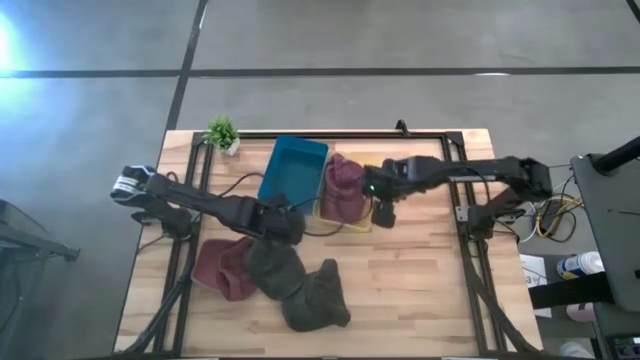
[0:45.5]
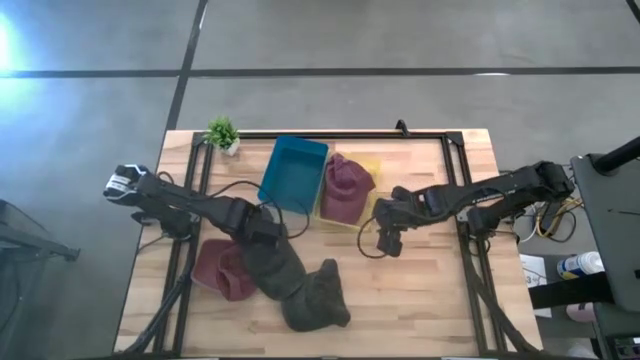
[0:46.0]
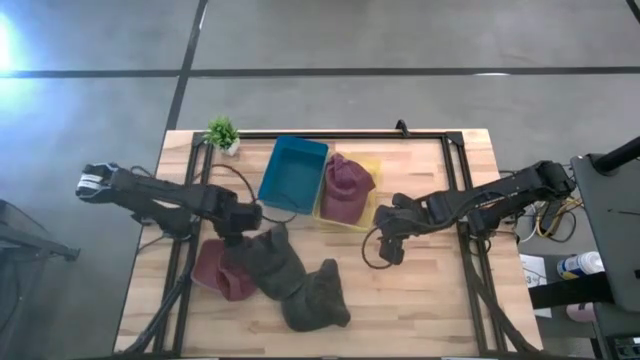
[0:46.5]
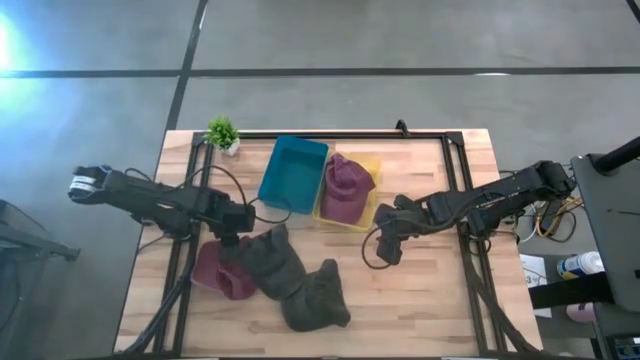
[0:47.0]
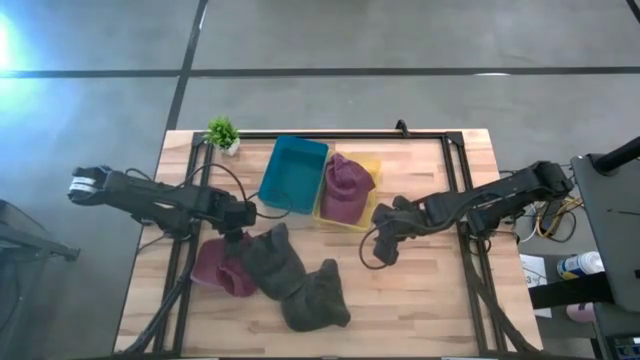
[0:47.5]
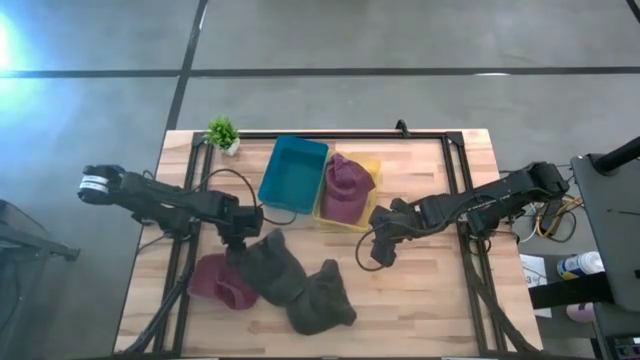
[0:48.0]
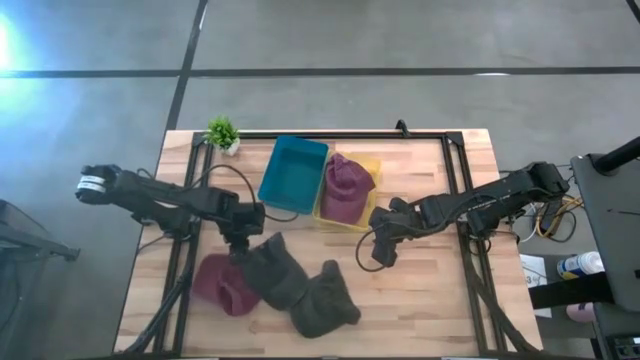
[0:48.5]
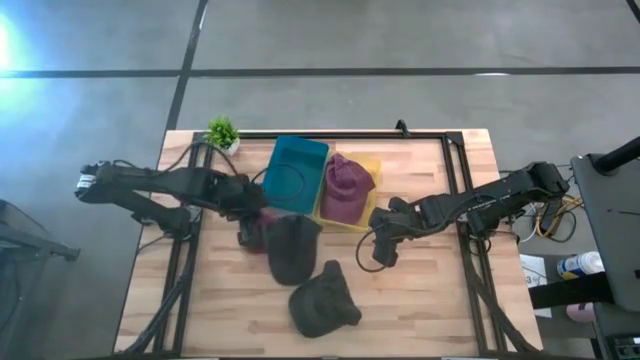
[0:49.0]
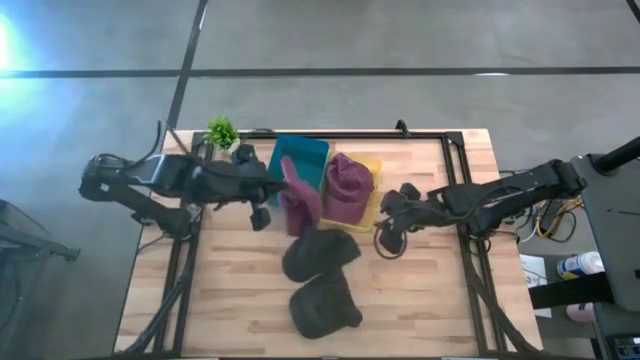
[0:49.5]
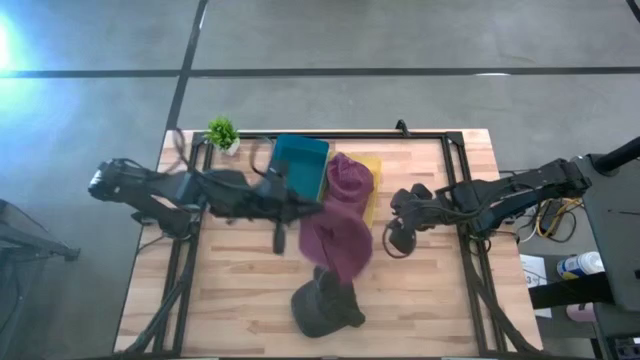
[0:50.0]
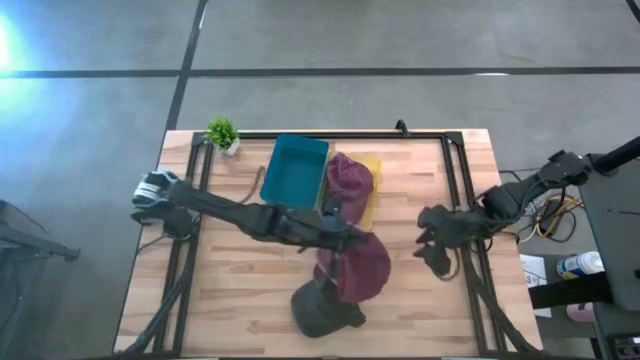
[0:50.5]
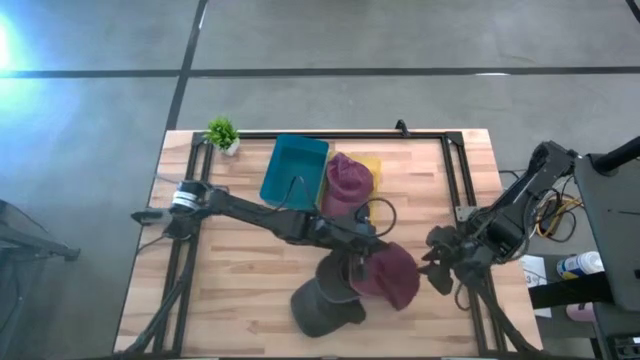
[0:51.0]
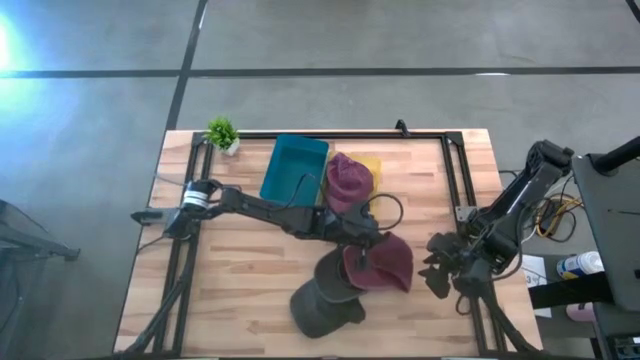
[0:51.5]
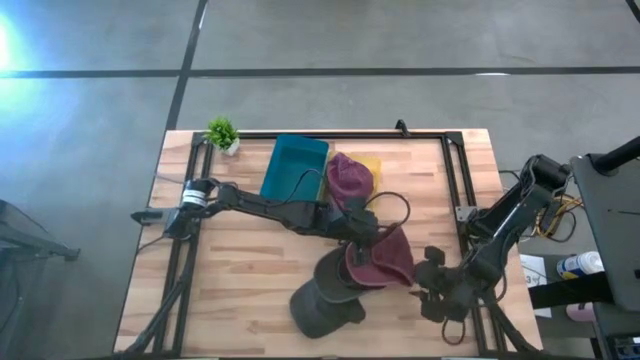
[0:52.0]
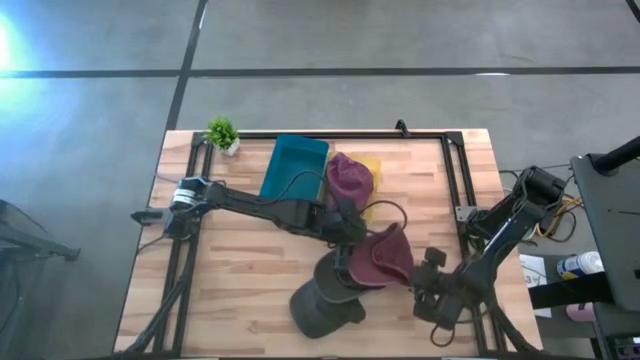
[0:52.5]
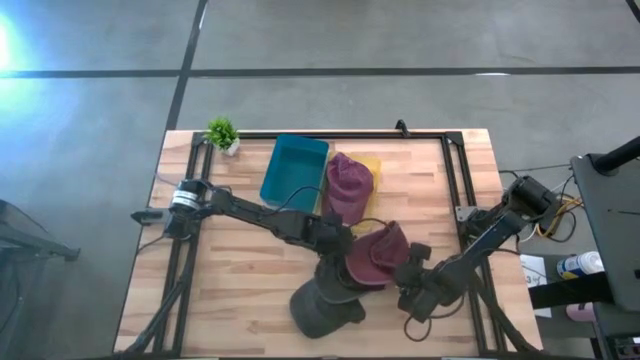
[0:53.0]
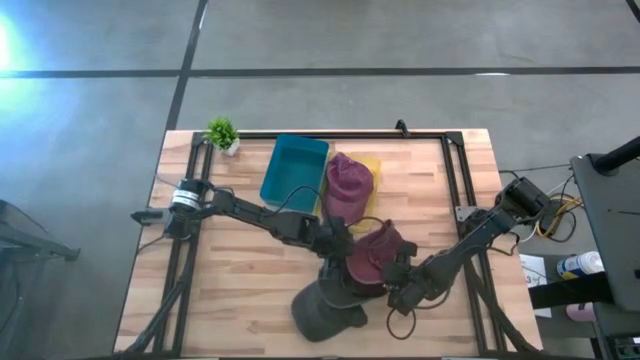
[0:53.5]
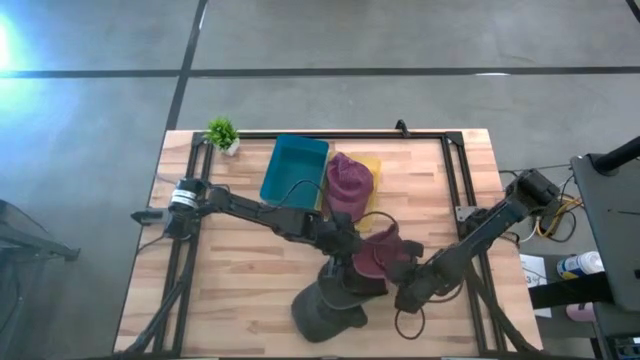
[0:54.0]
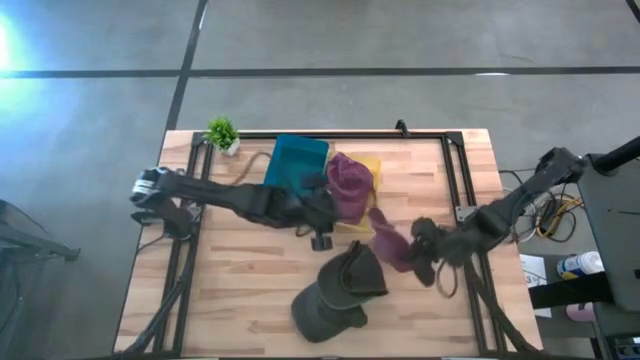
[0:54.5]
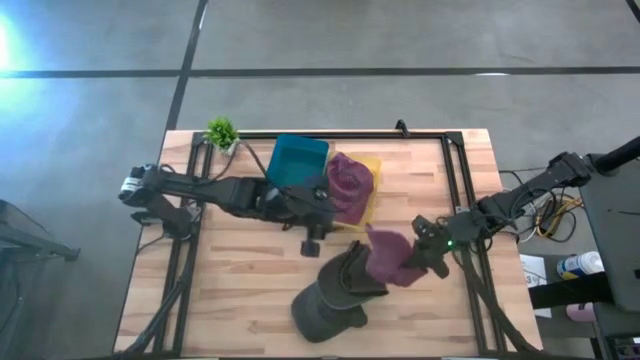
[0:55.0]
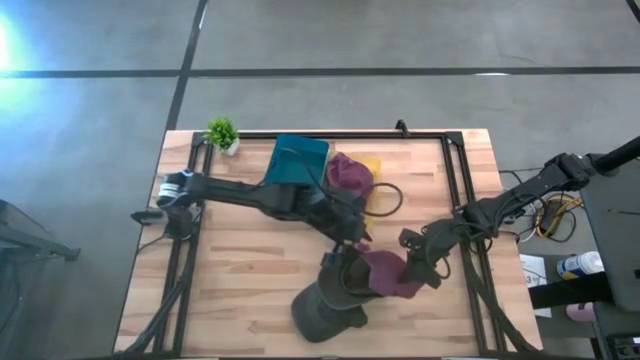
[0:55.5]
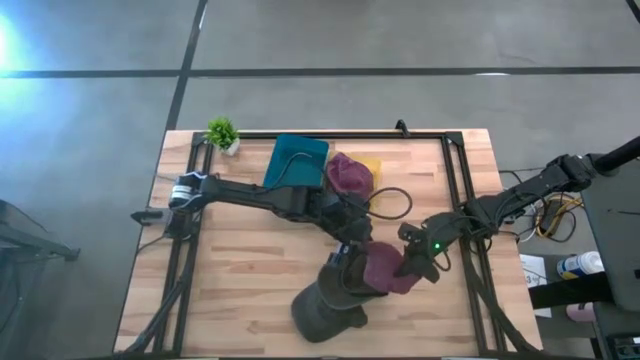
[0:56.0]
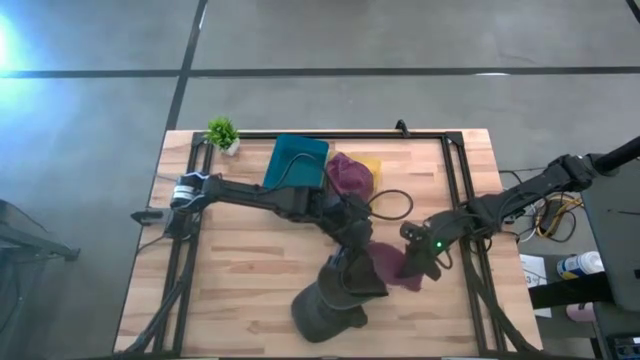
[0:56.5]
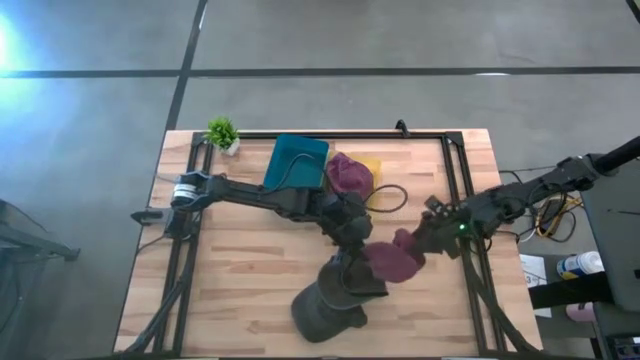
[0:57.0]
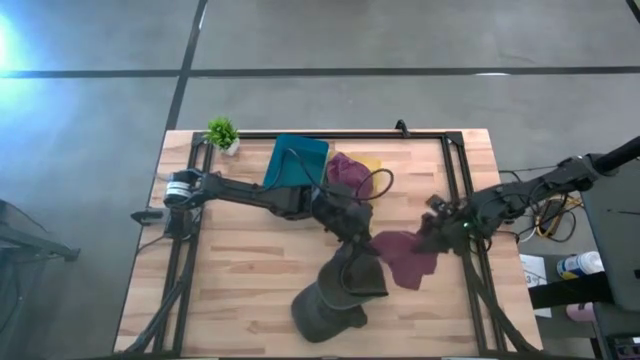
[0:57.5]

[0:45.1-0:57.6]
Task: Pick & Place hat
Put the red cap into the yellow bin

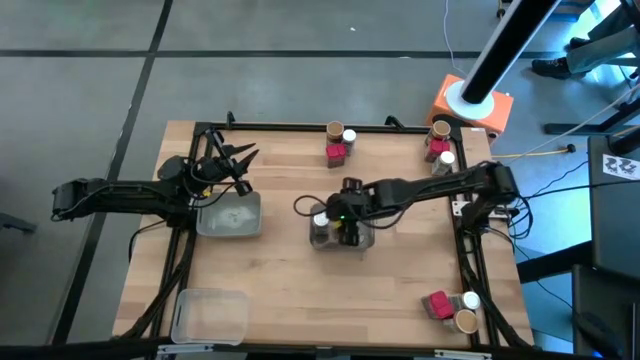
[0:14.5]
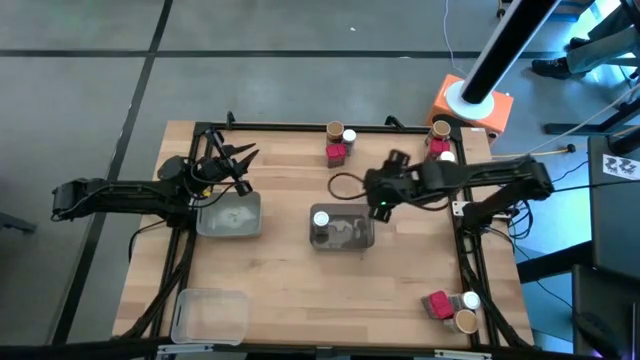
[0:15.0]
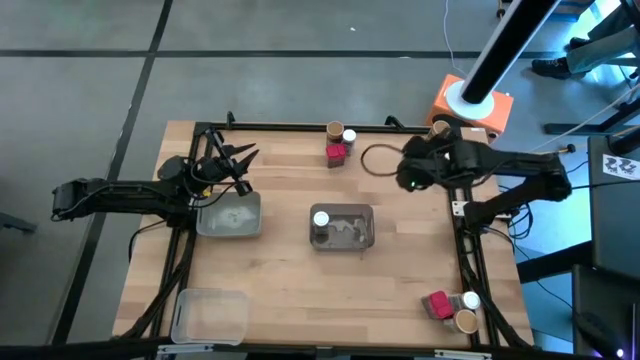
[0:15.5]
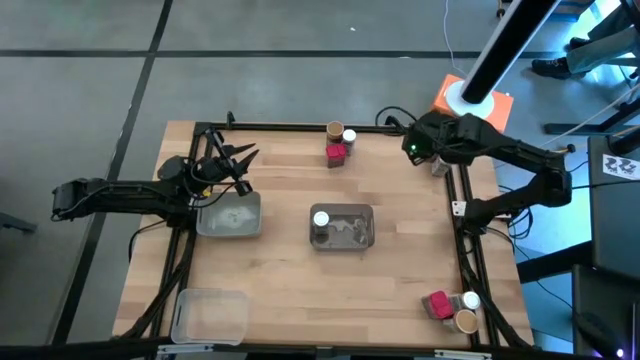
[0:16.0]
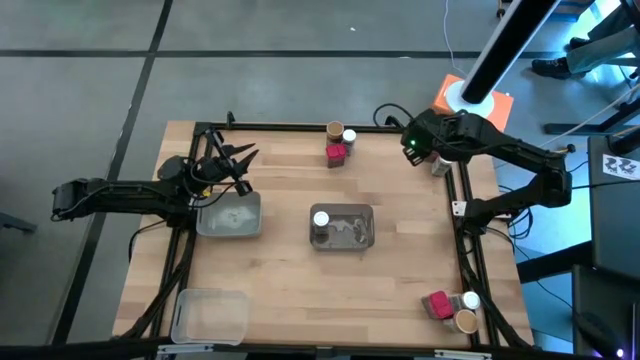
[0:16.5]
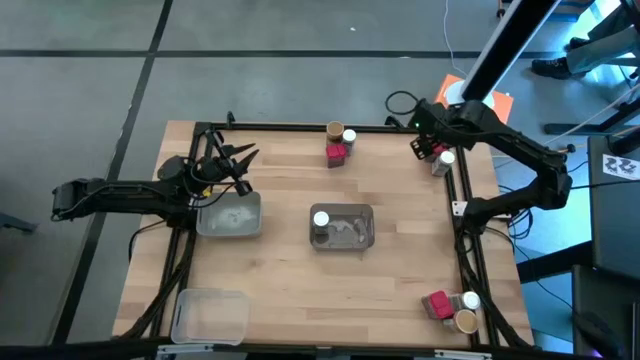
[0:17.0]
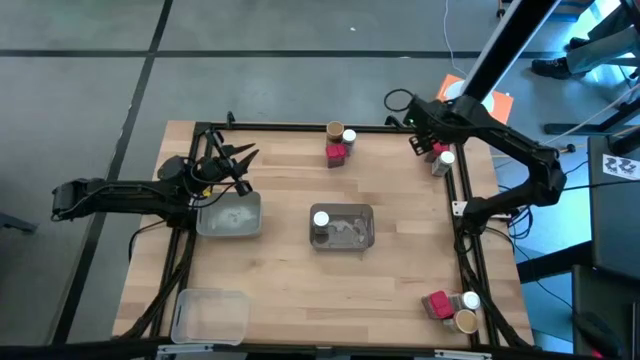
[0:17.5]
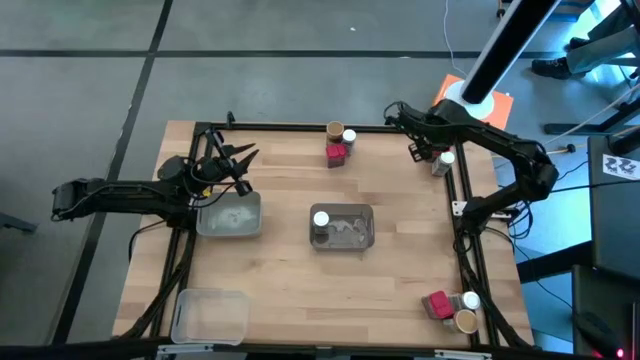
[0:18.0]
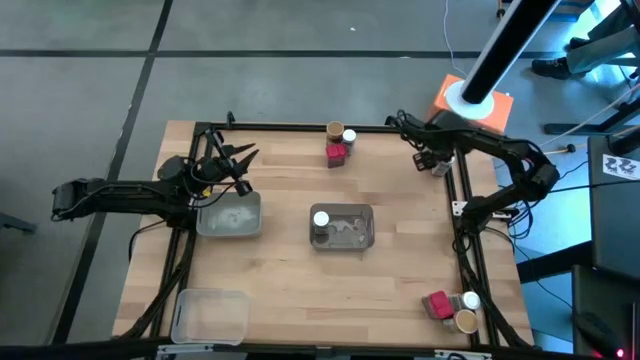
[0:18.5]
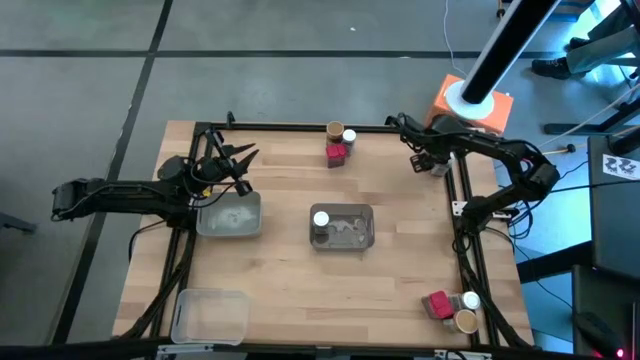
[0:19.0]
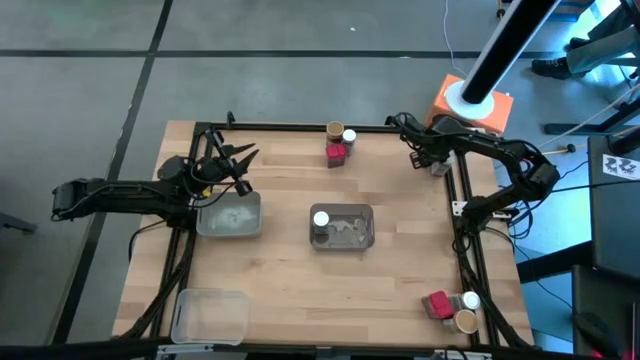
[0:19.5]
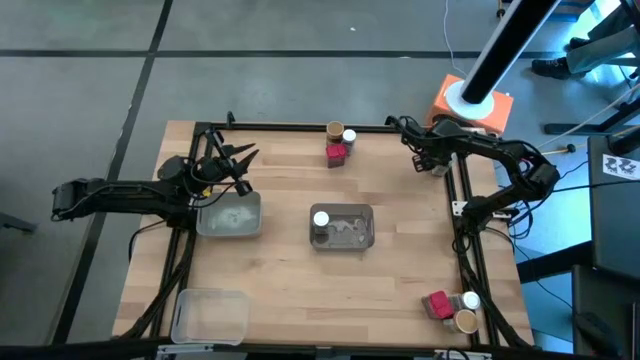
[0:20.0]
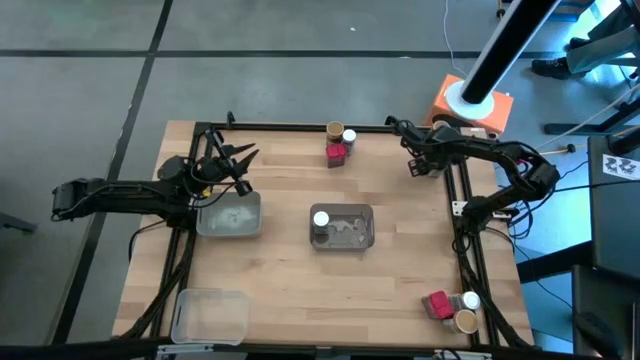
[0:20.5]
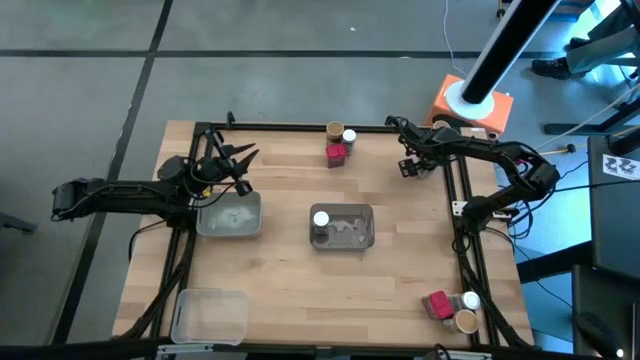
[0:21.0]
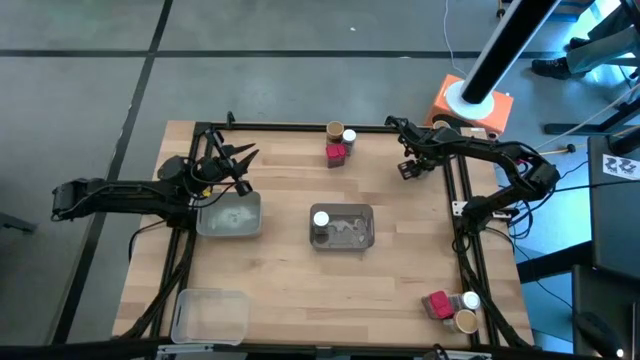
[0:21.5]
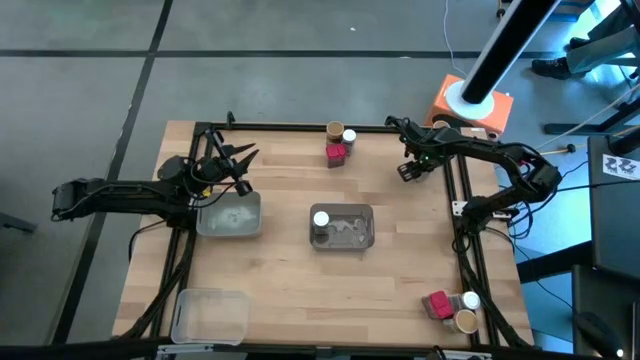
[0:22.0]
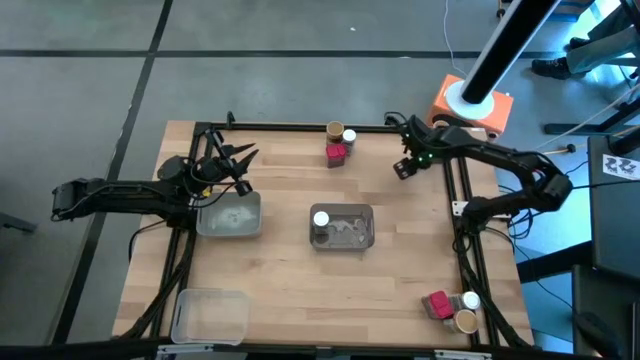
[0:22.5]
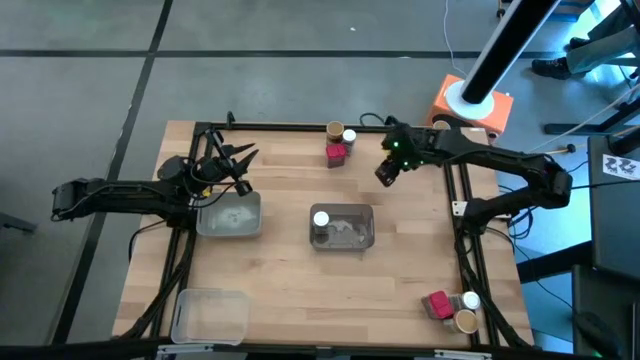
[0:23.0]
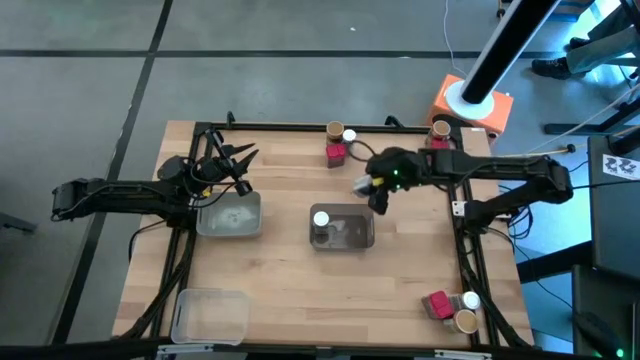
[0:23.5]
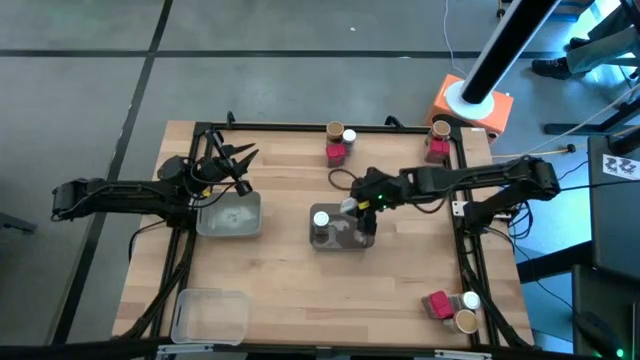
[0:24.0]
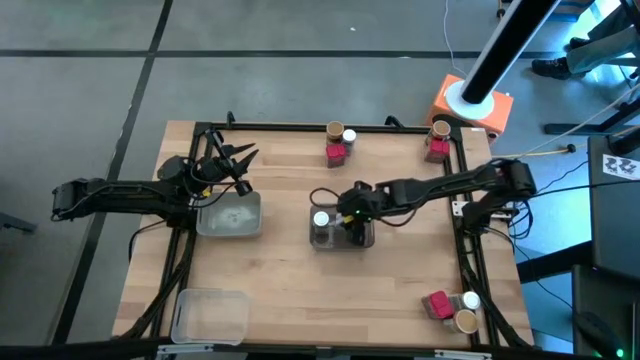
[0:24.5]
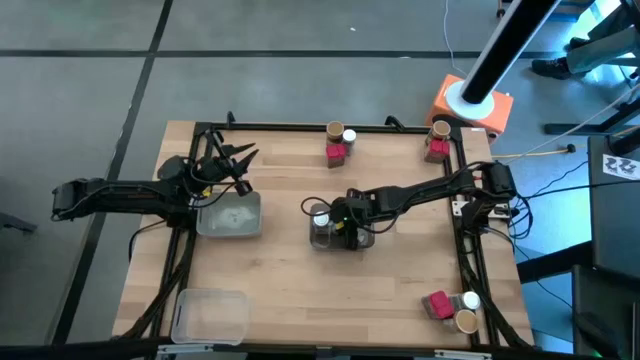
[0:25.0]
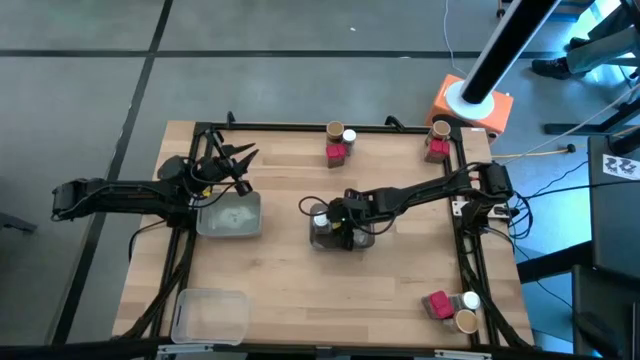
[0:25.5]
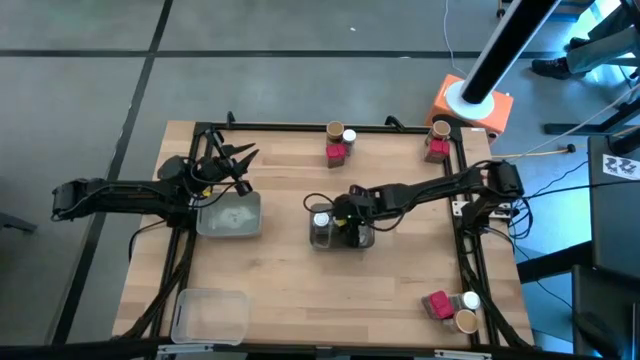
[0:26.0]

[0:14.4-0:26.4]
Task: Sort spices by type
Put the top right white seasoning bottle into the black bin
